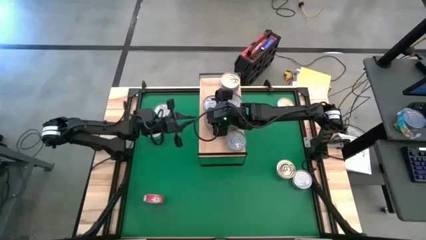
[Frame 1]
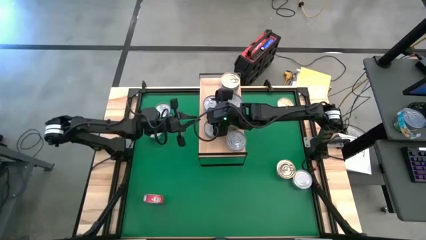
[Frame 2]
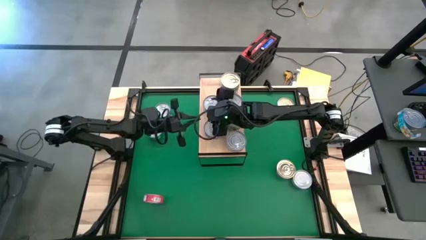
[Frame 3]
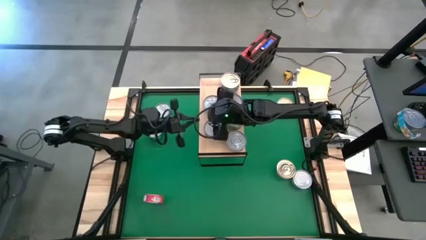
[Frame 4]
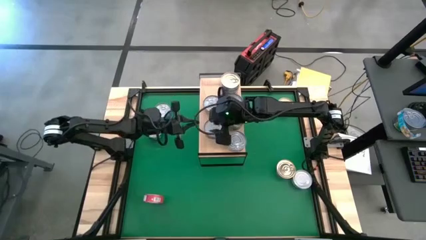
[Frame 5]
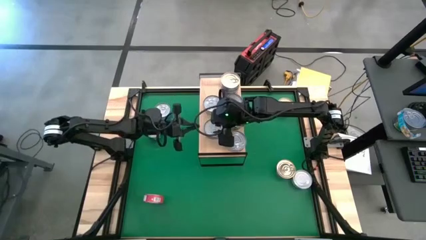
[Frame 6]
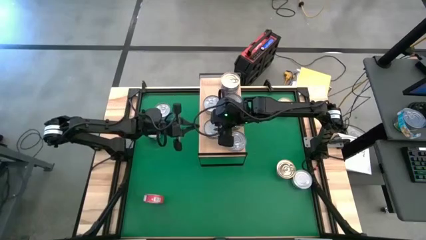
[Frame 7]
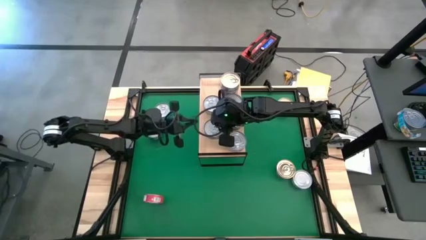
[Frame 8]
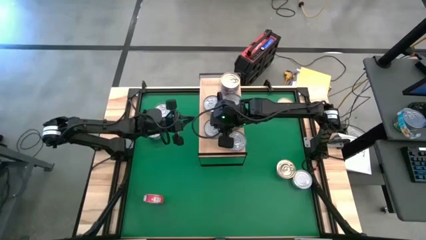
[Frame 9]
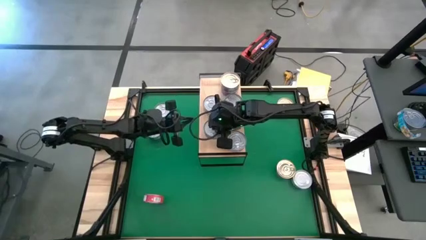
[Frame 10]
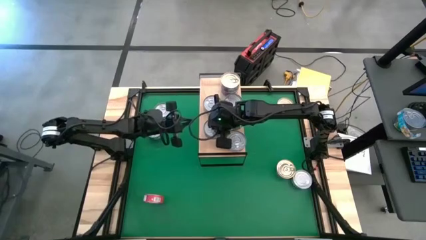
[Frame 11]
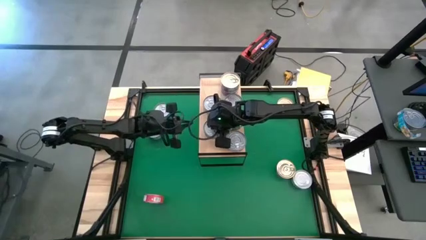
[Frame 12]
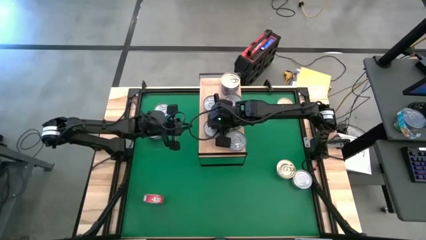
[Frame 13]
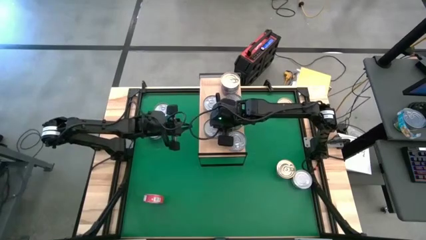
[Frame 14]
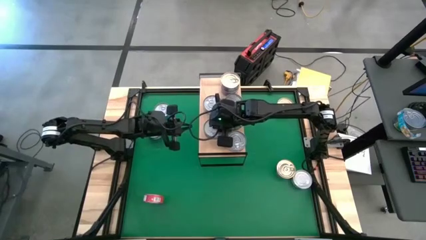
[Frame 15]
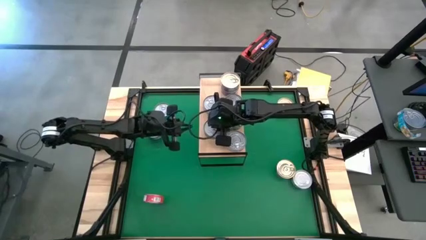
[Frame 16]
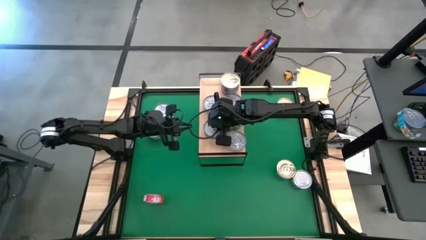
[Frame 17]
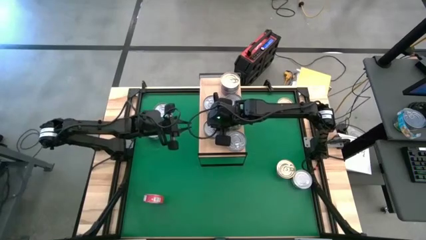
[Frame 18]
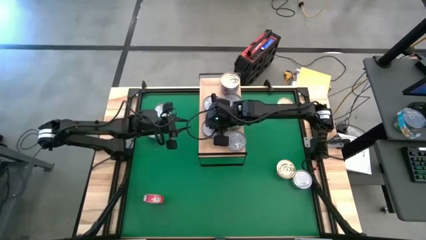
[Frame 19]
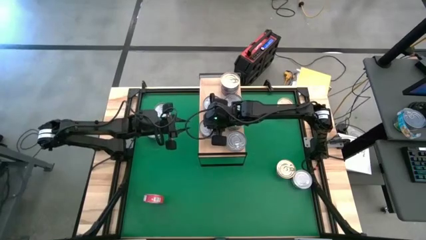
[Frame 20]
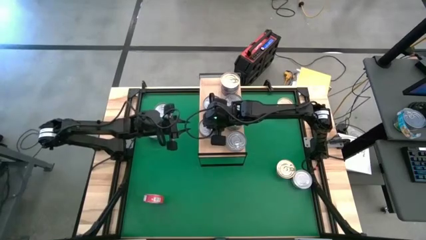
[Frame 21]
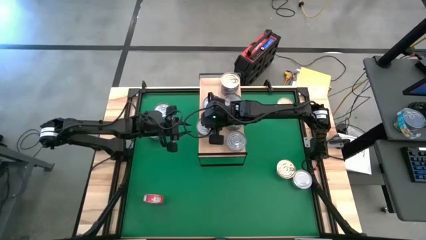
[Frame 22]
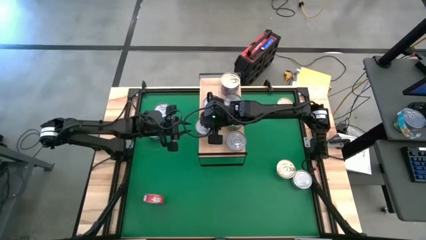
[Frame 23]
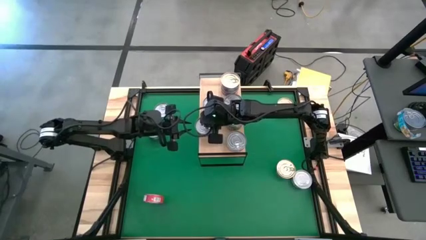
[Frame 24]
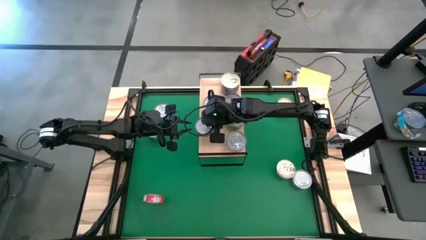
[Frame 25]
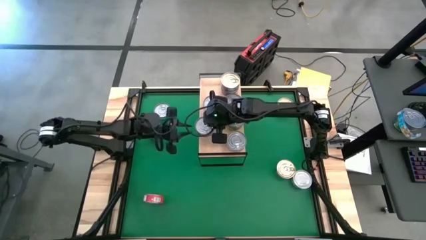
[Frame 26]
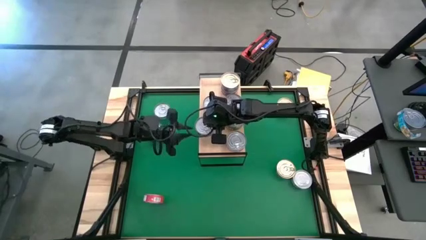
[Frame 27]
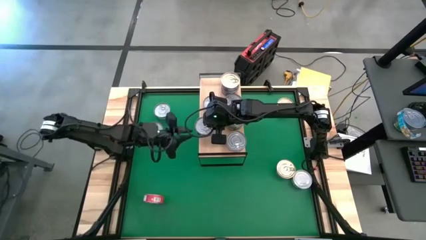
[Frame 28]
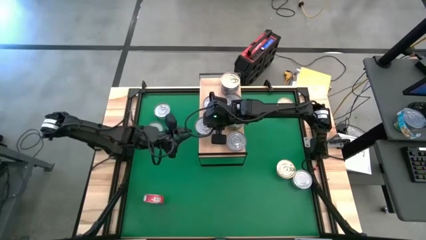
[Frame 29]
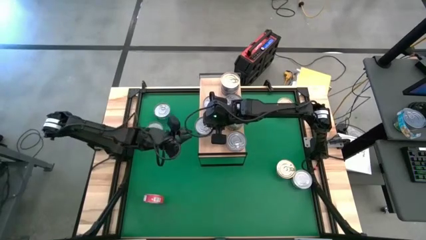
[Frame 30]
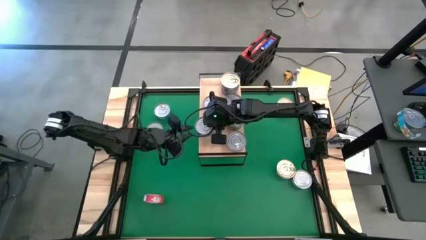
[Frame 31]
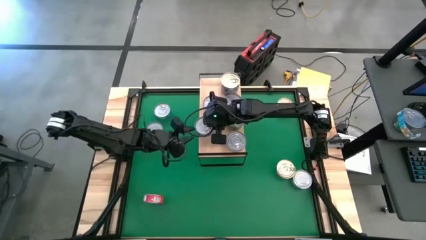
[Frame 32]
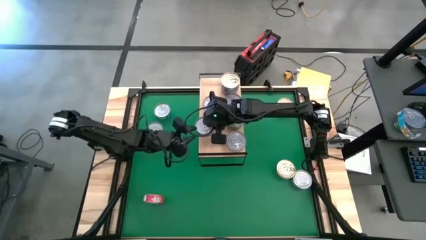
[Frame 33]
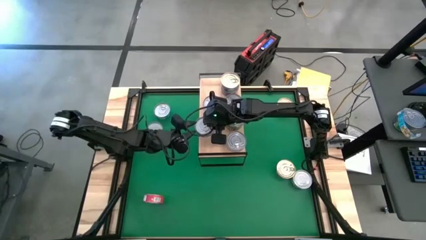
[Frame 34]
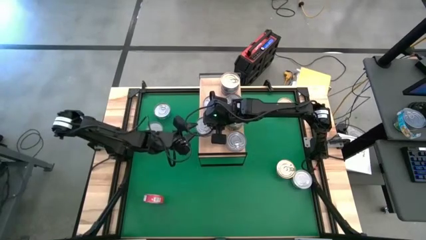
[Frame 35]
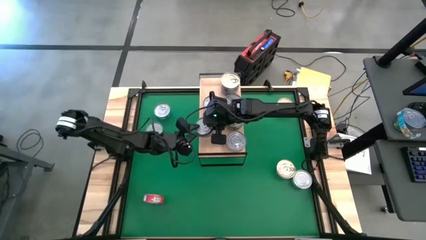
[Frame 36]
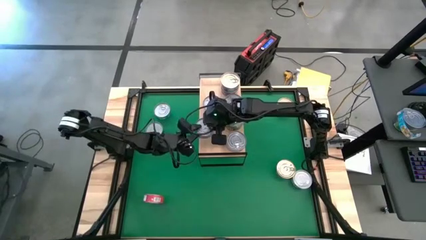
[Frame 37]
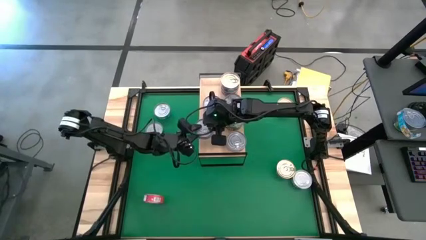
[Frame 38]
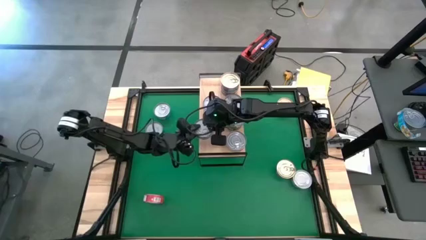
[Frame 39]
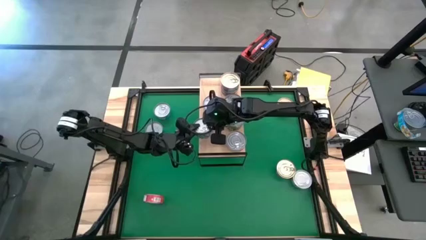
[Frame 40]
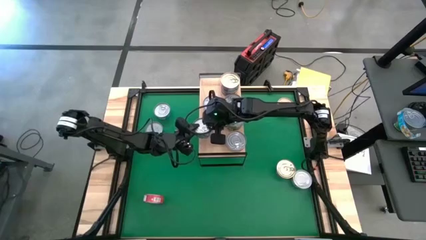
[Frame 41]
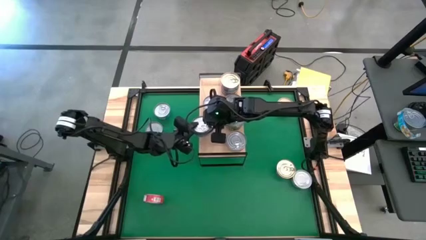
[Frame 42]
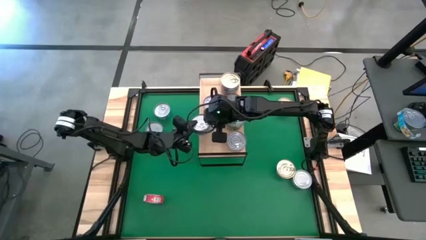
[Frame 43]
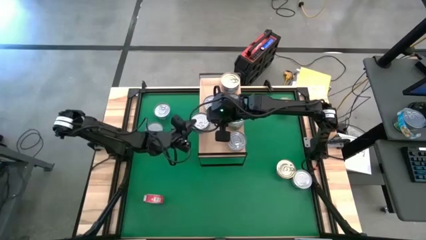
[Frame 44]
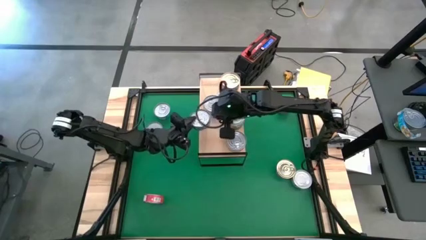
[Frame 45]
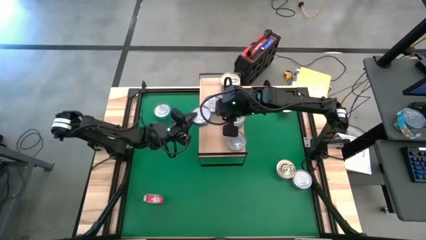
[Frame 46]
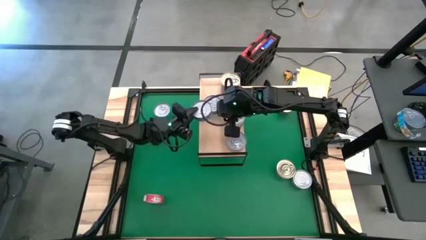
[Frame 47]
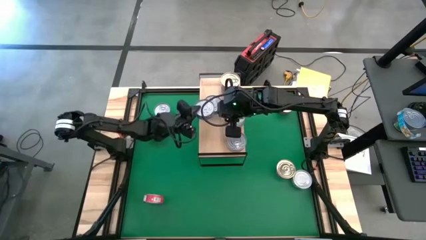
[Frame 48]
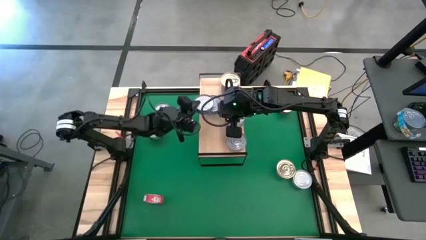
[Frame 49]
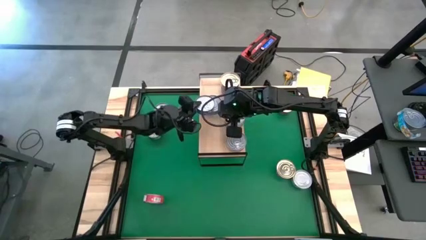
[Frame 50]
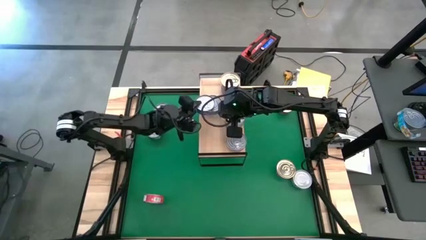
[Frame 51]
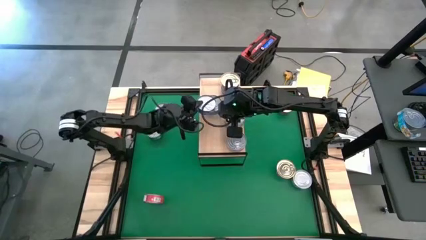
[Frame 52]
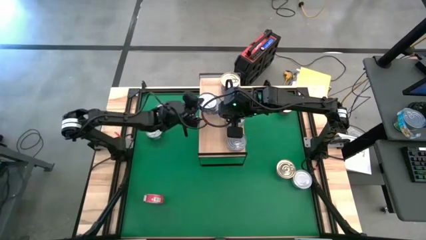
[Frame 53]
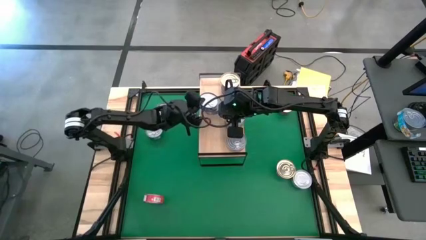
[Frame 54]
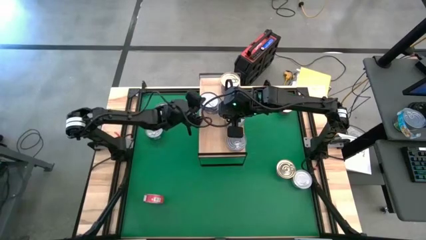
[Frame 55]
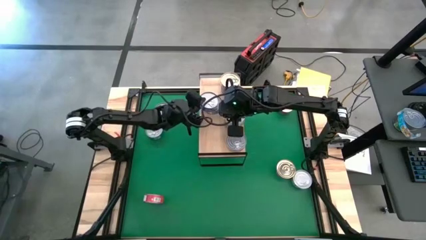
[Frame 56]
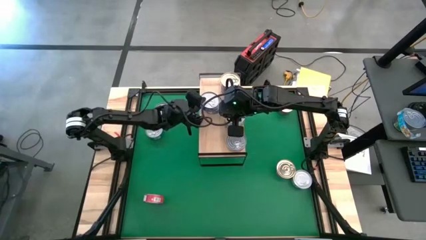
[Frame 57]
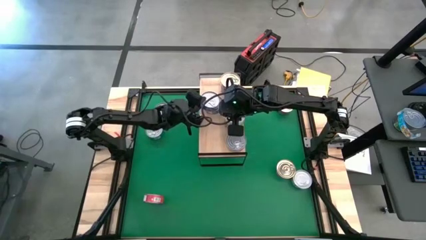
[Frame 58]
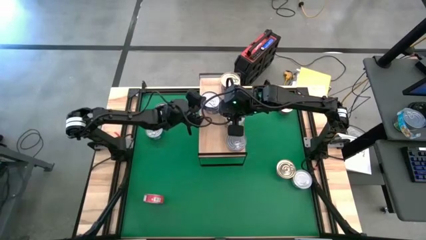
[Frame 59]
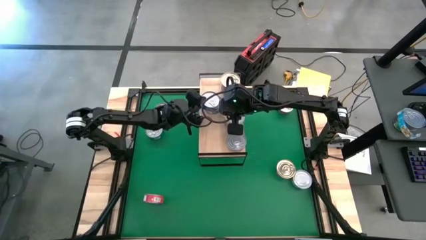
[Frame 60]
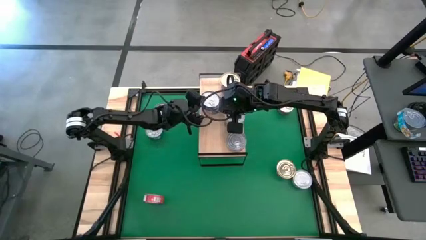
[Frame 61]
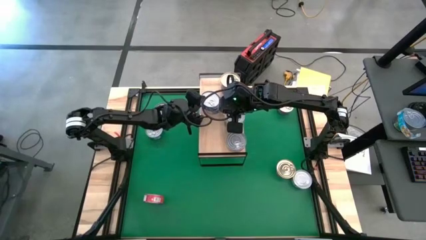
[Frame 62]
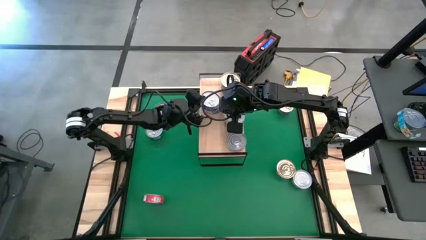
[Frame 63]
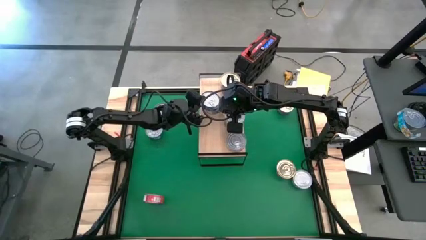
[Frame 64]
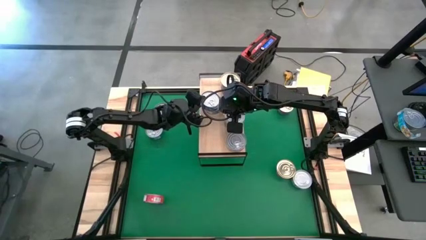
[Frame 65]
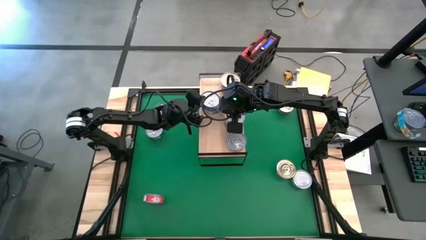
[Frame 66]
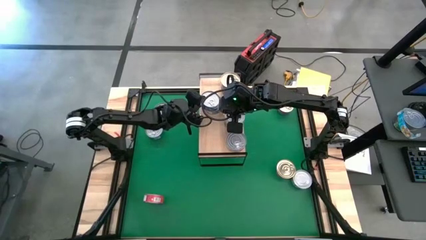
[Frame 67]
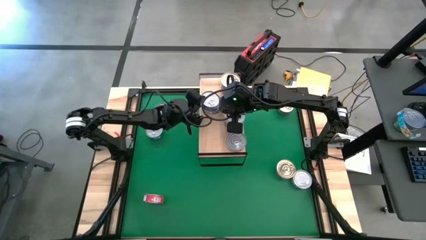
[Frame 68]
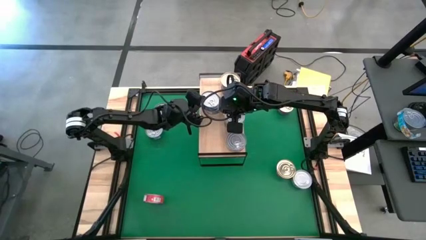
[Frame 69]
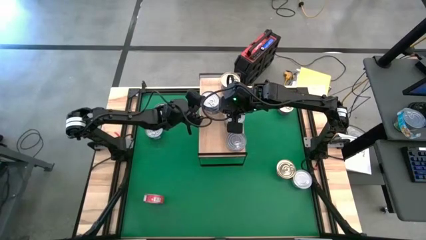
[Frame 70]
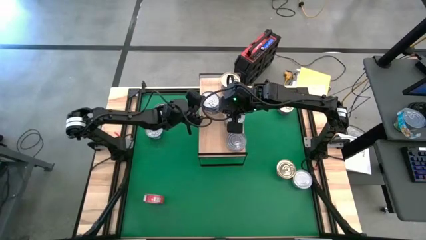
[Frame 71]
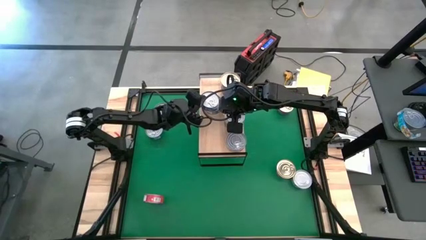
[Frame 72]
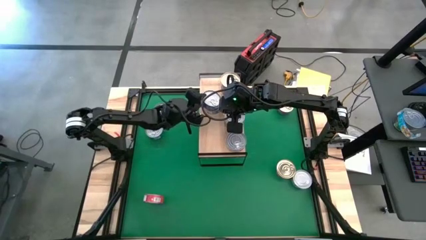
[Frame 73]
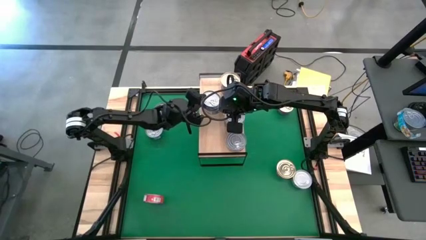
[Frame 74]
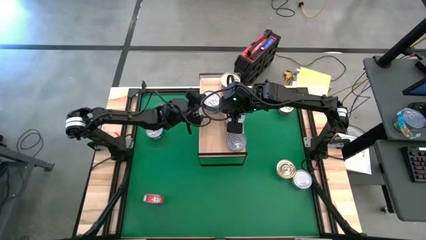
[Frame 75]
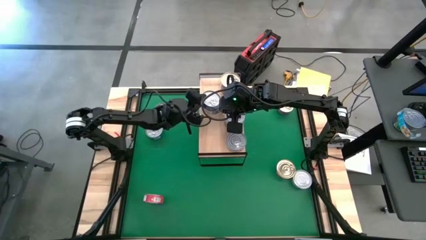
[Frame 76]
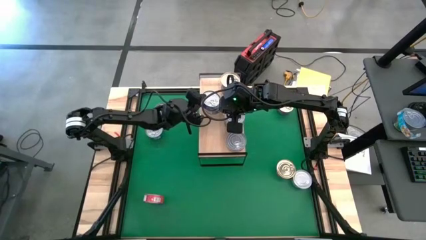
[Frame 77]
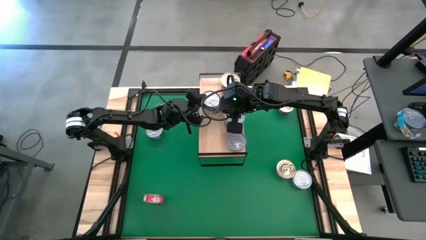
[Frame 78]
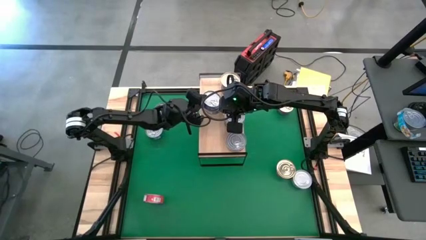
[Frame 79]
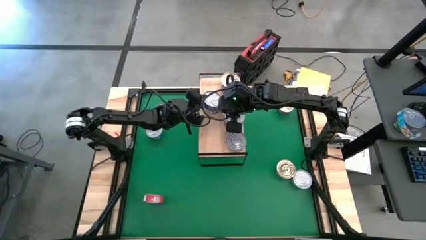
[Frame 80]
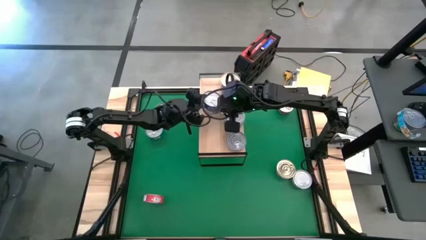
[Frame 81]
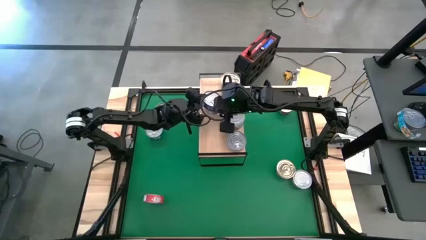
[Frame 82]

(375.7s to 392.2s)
Task: Stack canned seafood by type on shelf
Stack the blue tuna can on top of the blue tuna can on the shelf
